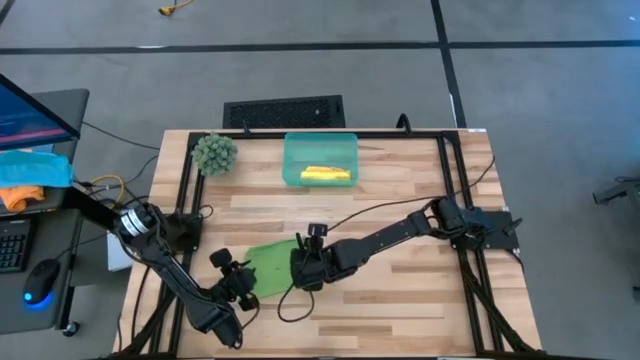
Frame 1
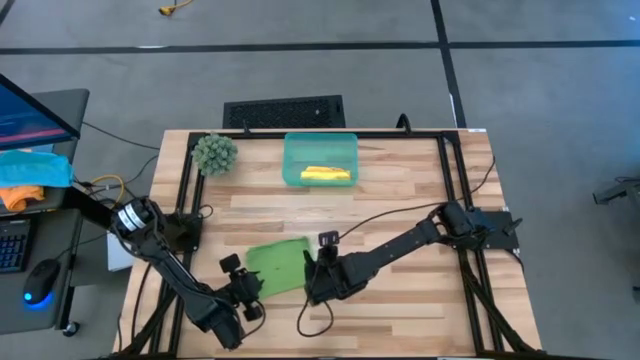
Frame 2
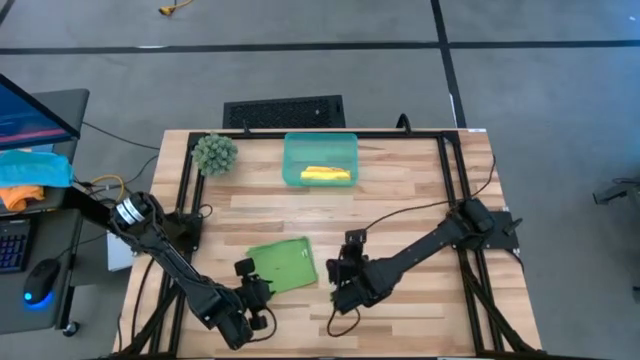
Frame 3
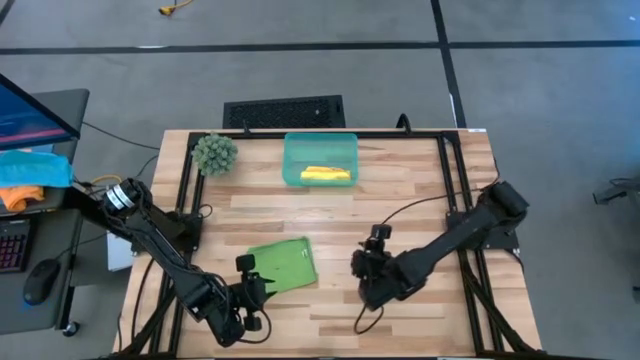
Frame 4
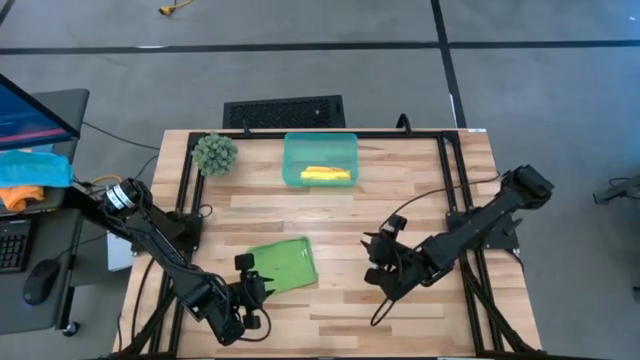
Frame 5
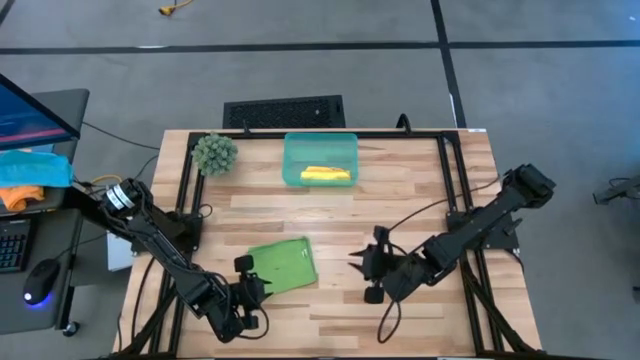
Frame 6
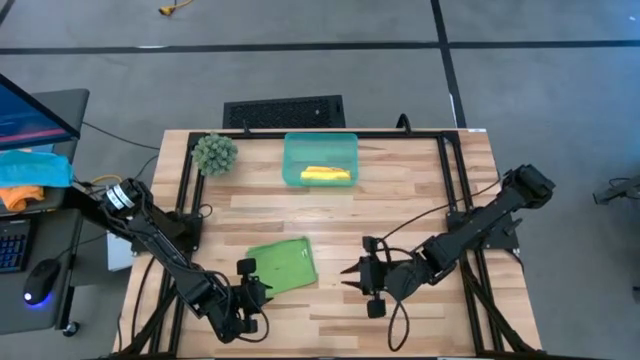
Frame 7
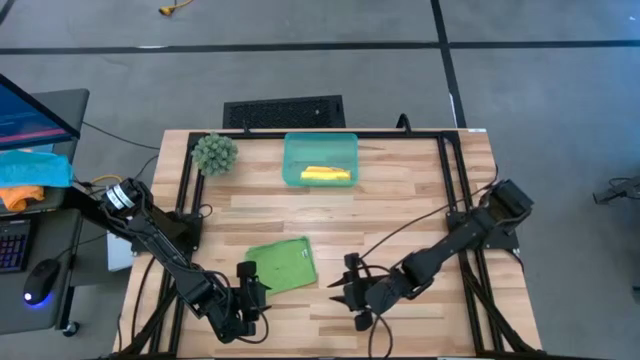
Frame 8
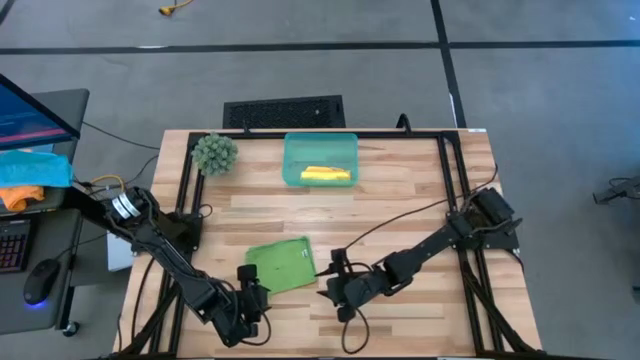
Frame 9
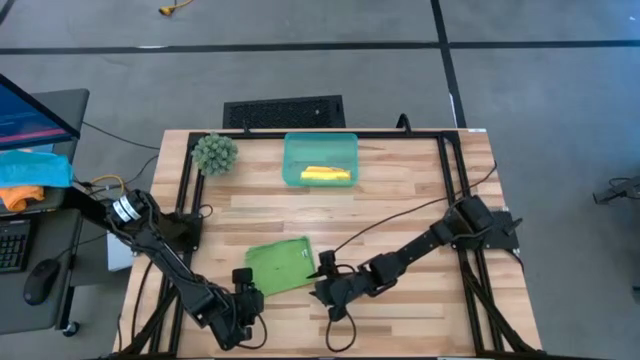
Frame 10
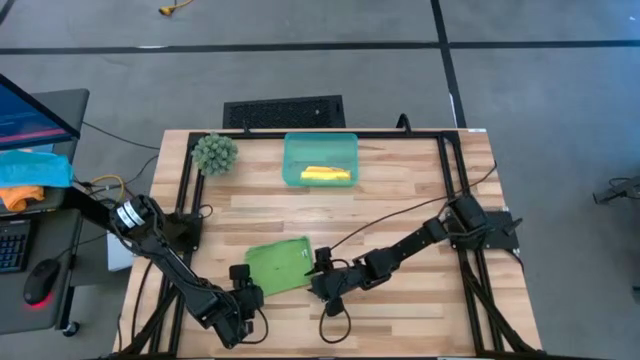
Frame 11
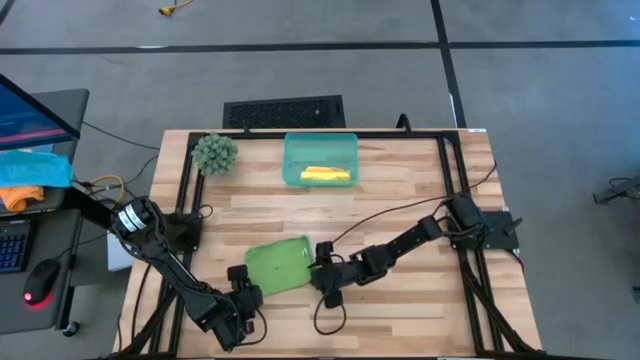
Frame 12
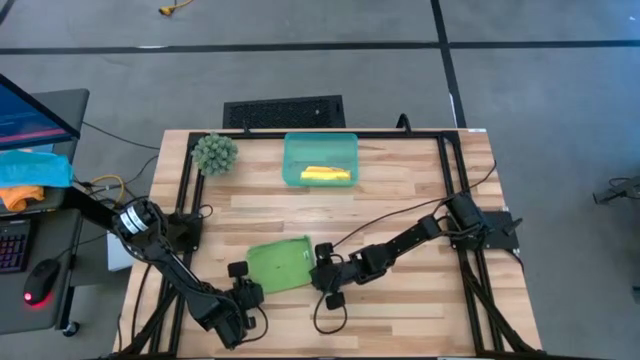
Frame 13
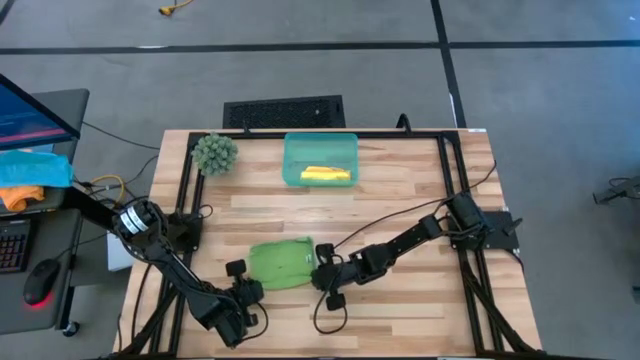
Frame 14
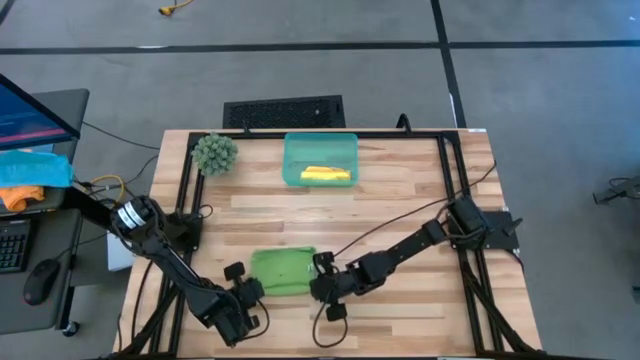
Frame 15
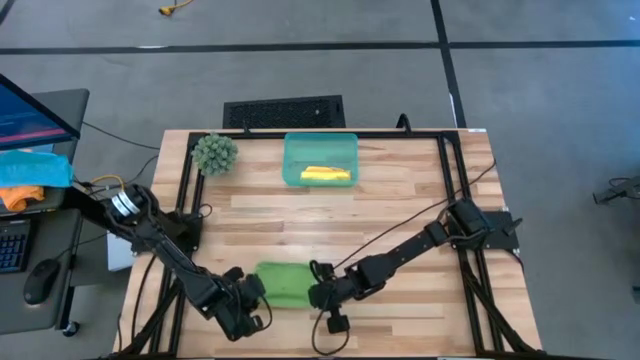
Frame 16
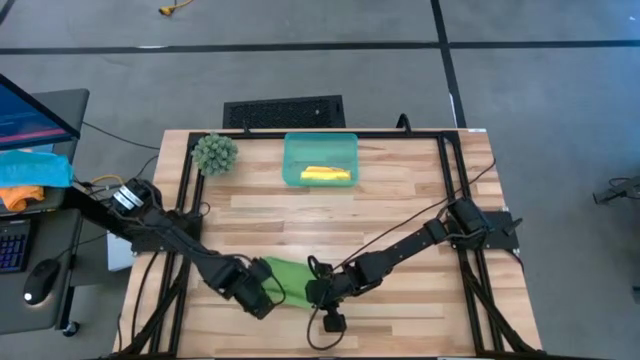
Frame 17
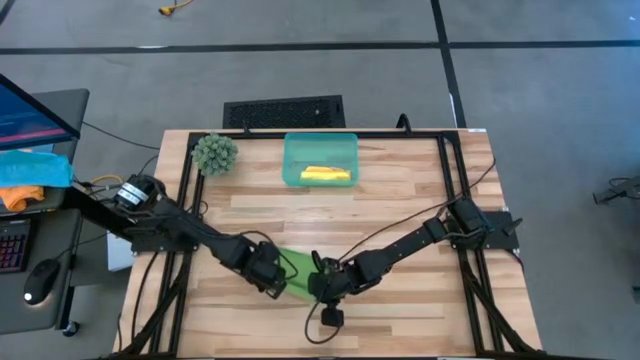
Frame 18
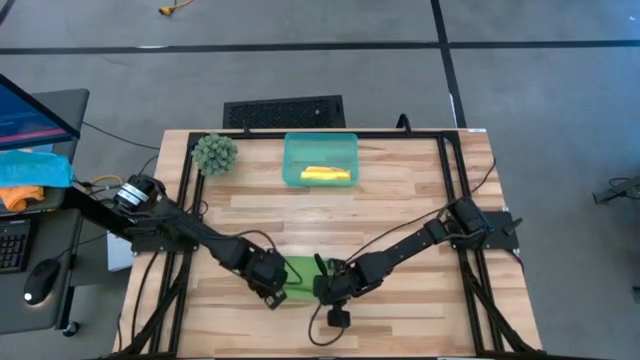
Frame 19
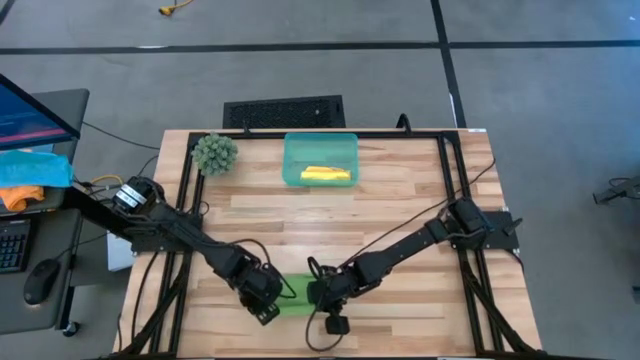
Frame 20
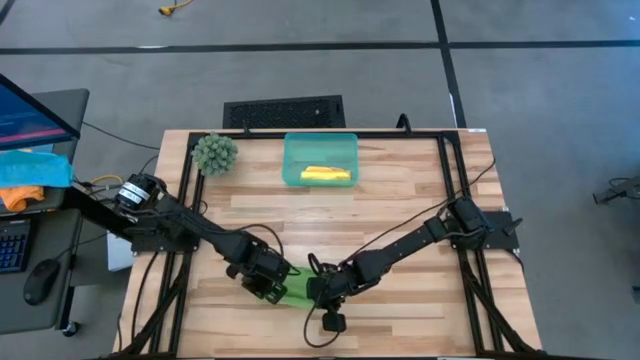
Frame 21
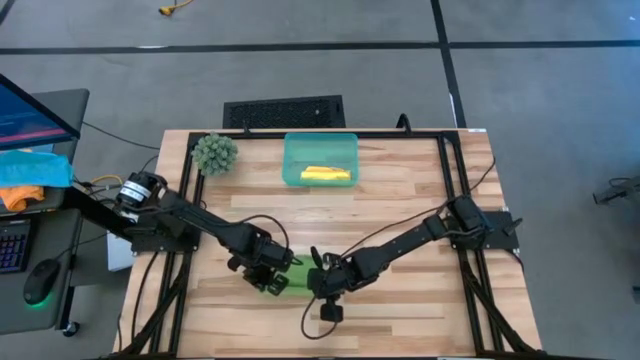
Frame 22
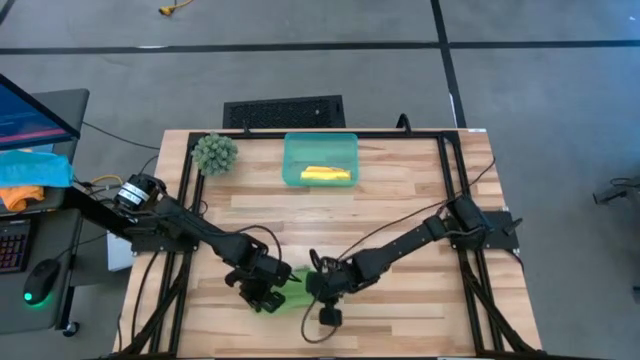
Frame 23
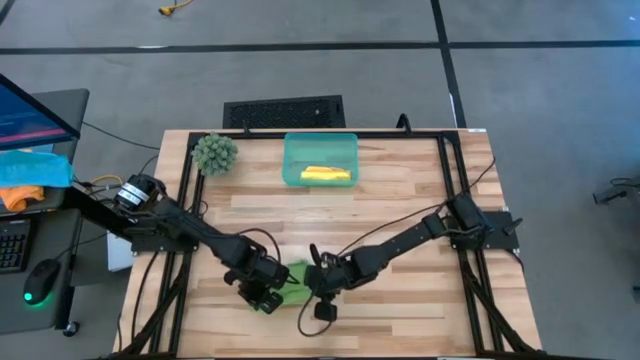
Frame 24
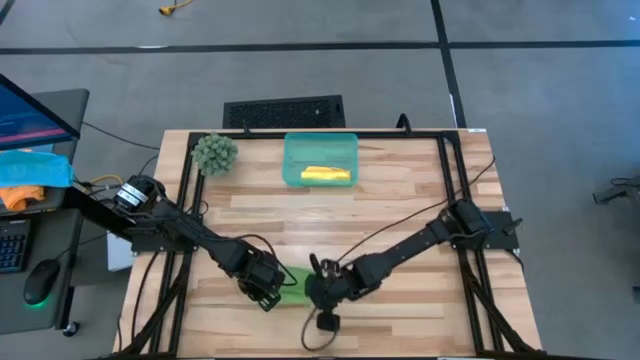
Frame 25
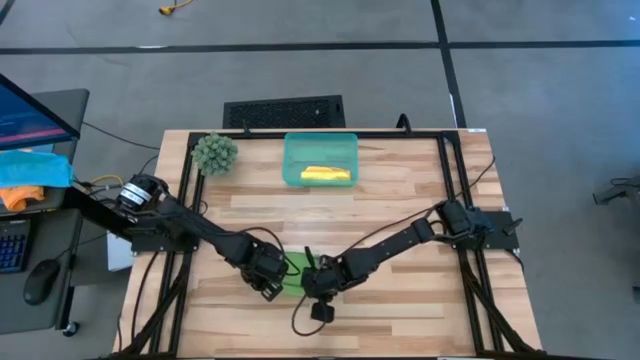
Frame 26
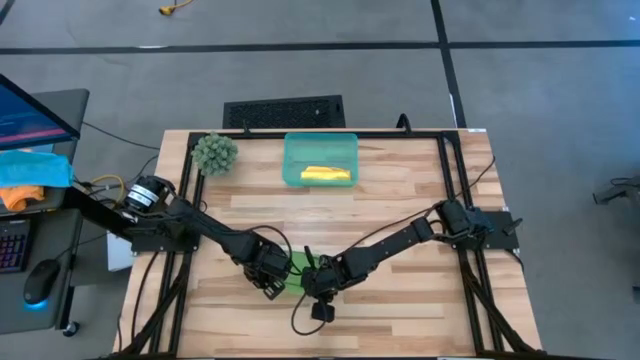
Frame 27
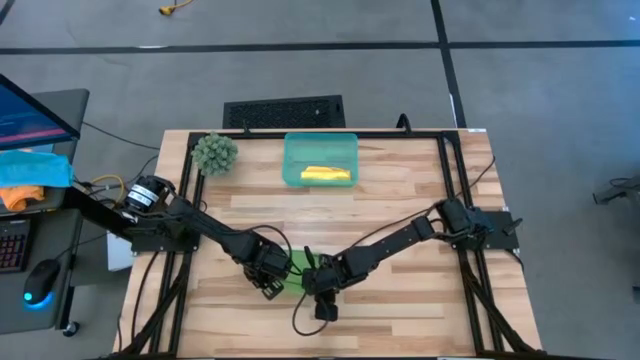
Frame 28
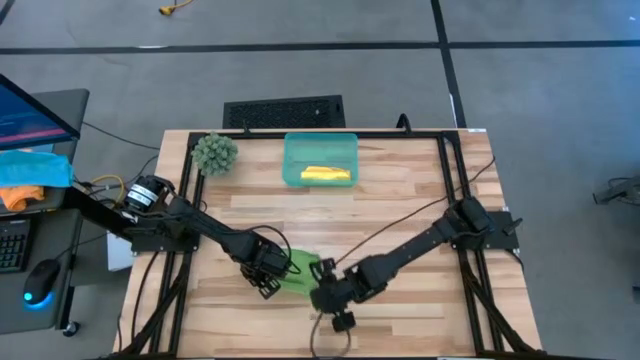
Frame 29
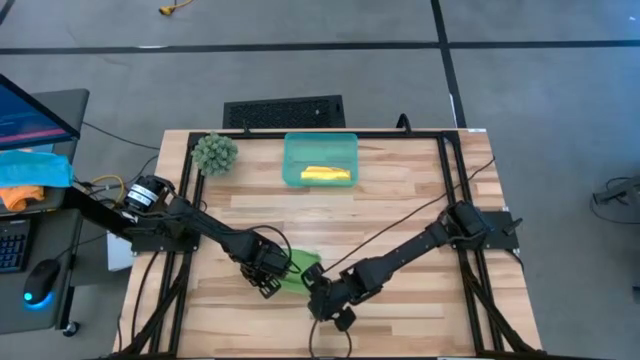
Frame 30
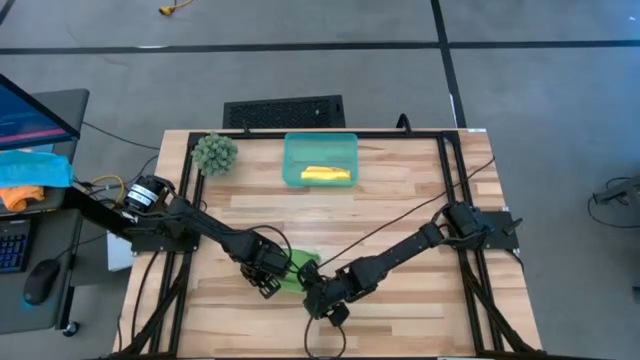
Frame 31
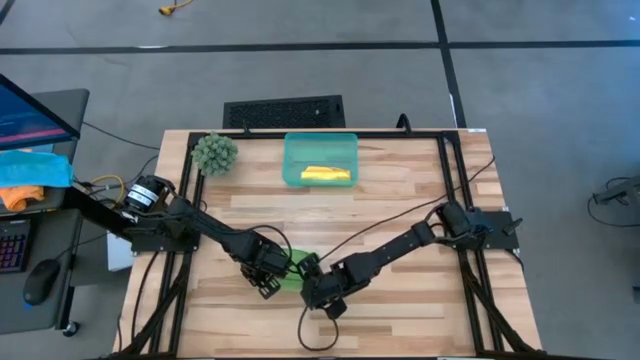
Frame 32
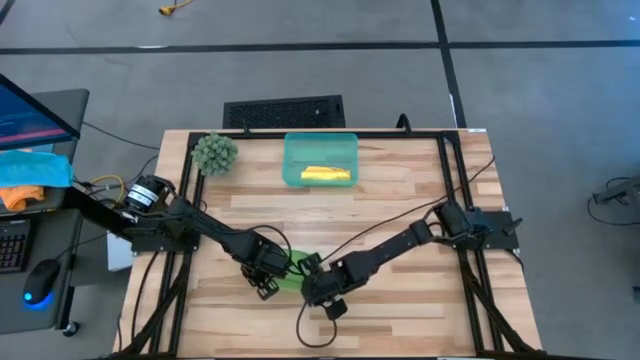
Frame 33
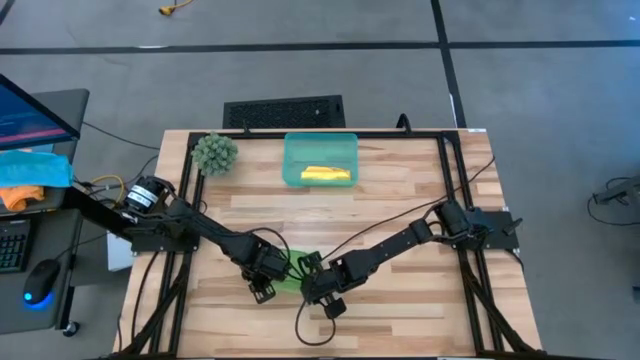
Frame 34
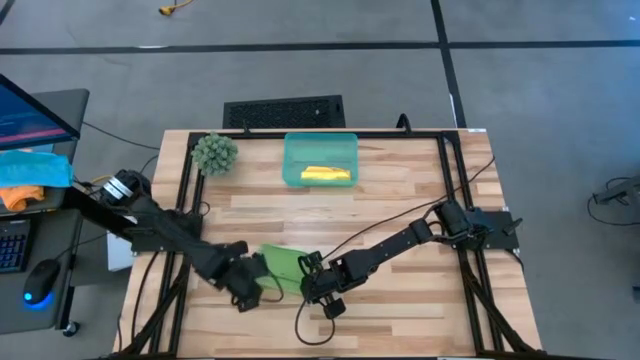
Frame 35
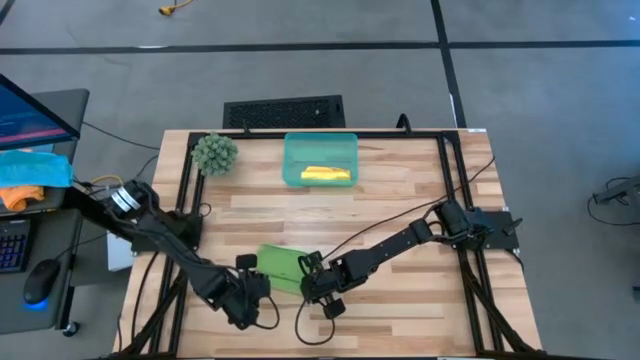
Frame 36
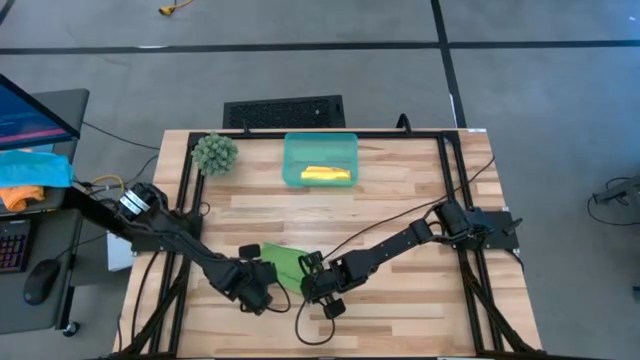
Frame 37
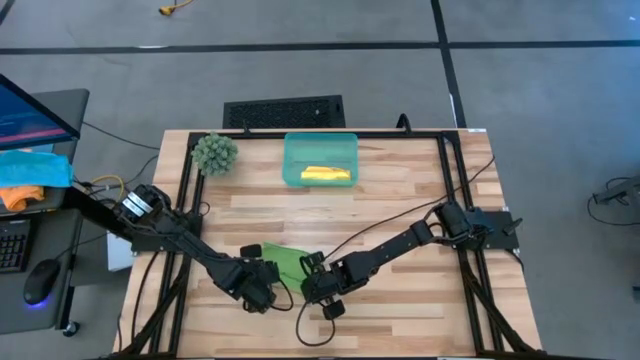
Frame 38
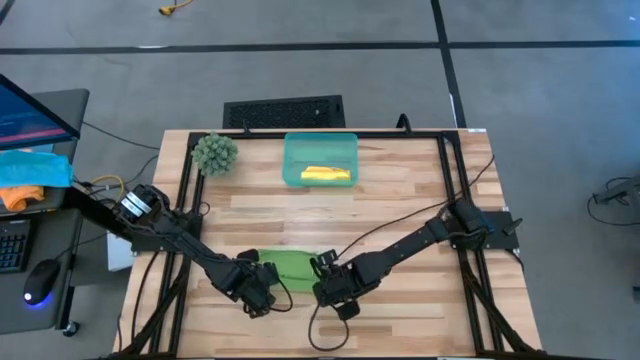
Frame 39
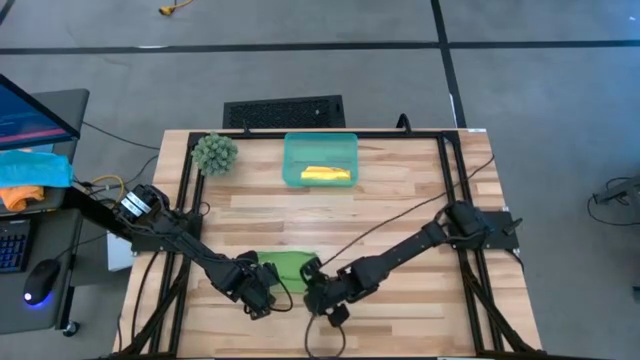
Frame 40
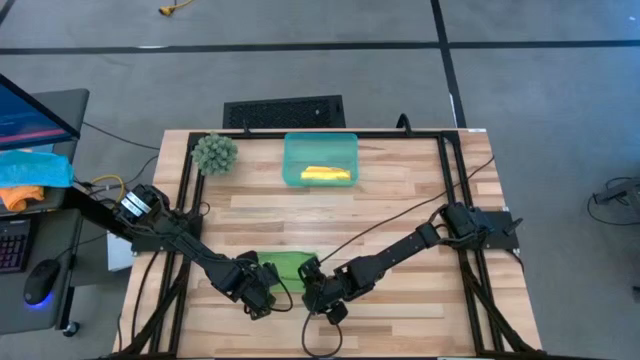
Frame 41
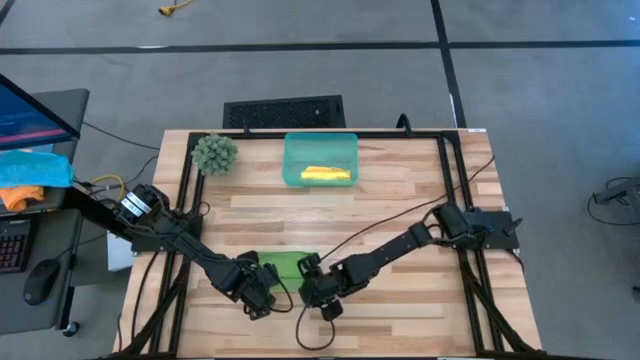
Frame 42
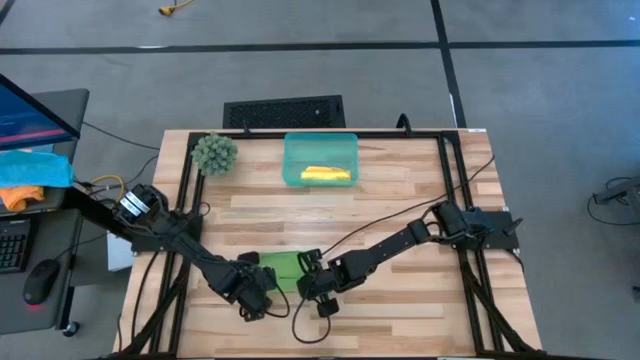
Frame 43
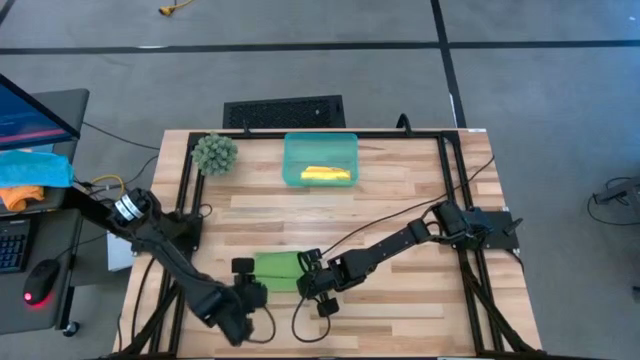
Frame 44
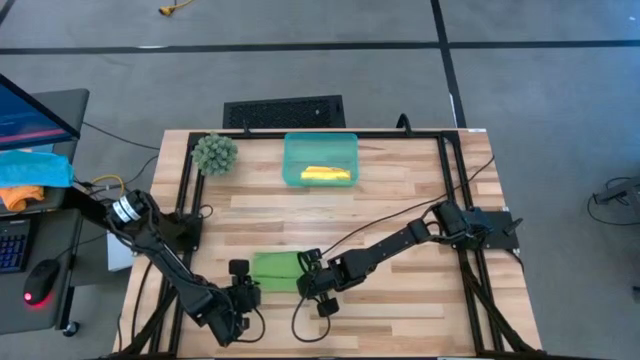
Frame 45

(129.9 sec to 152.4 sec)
Task: Roll microfiber towels into tight, uniform cylinder then place into a basket
Roll the green microfiber cloth
